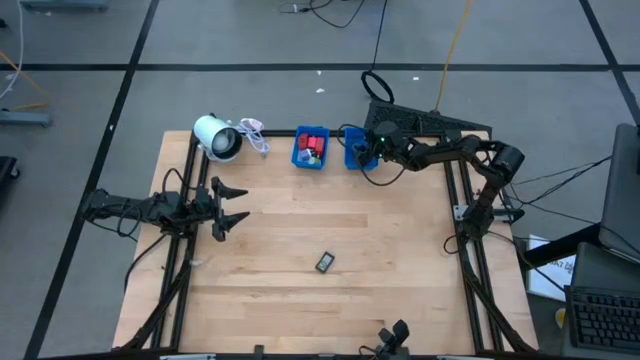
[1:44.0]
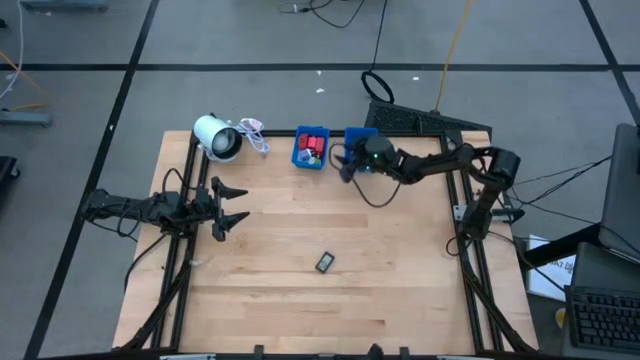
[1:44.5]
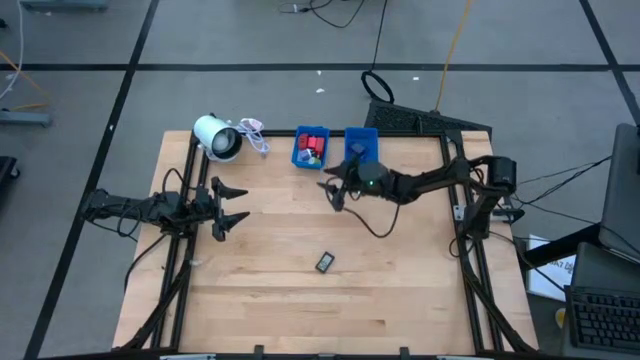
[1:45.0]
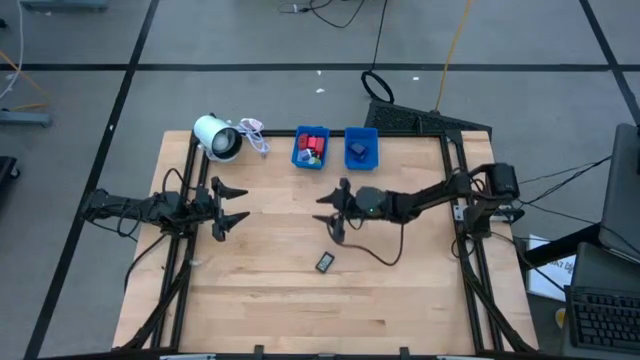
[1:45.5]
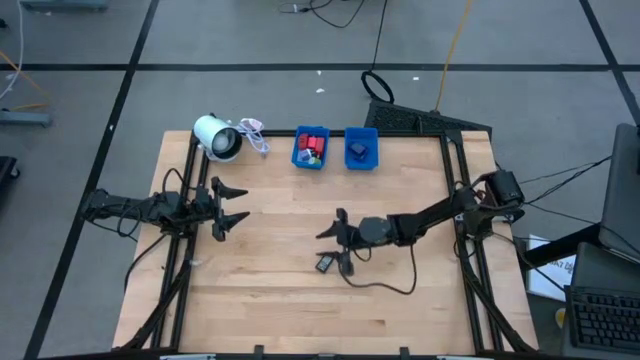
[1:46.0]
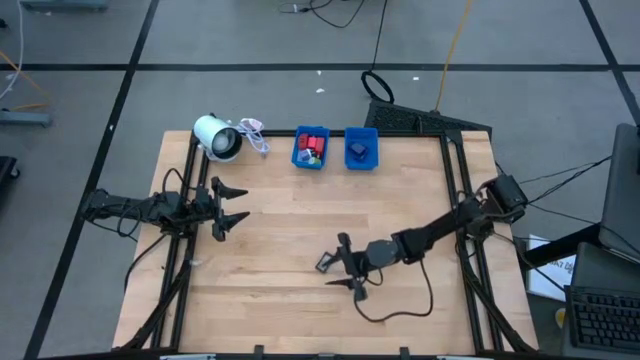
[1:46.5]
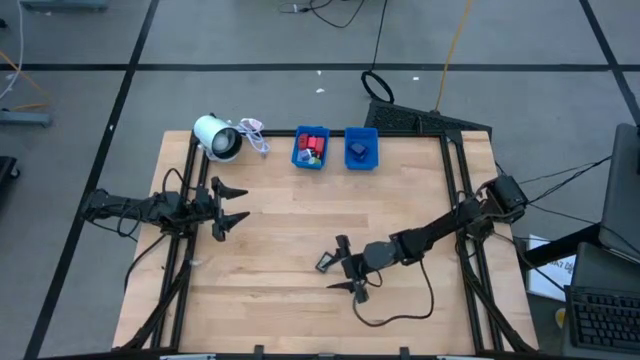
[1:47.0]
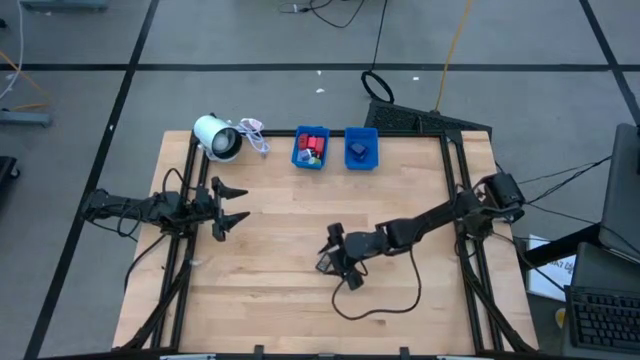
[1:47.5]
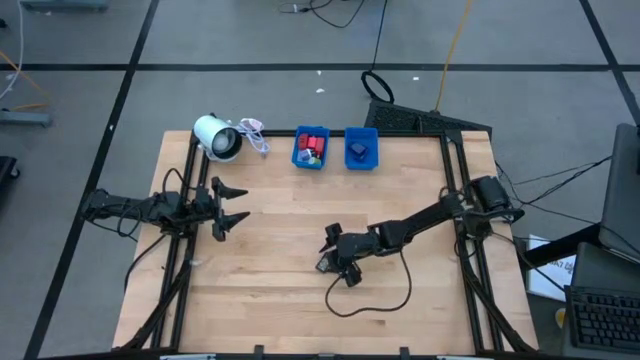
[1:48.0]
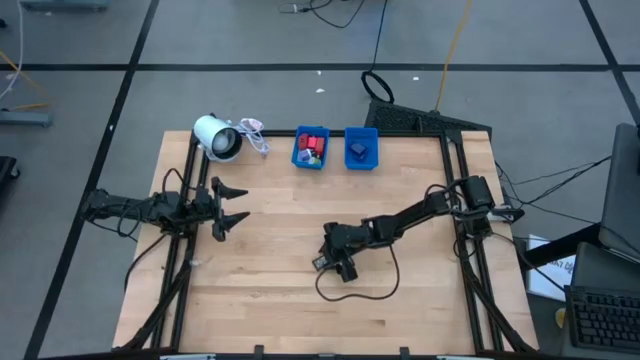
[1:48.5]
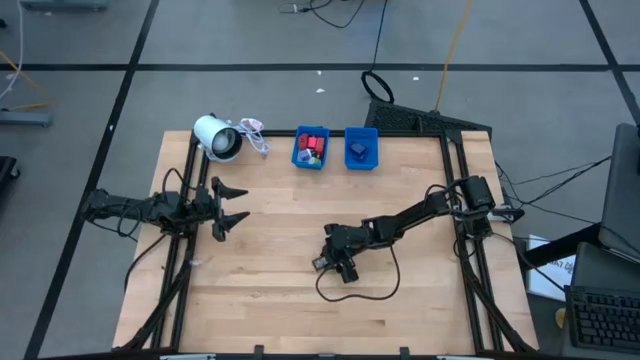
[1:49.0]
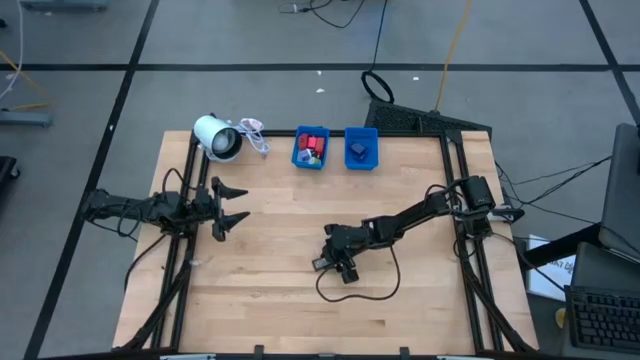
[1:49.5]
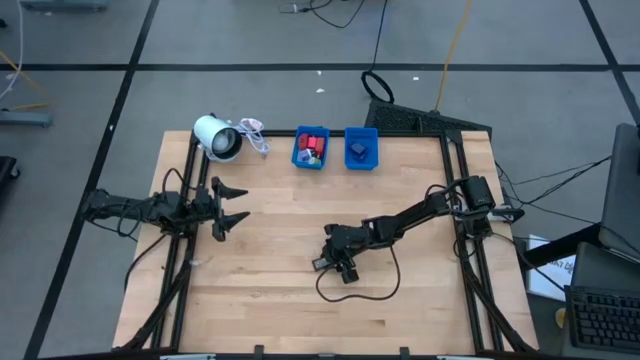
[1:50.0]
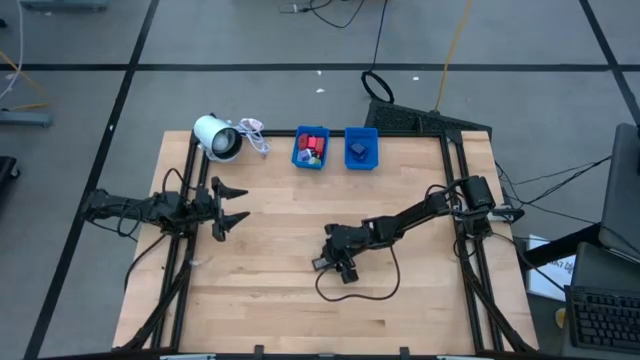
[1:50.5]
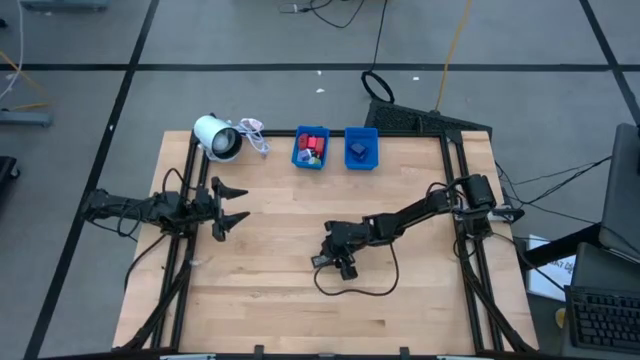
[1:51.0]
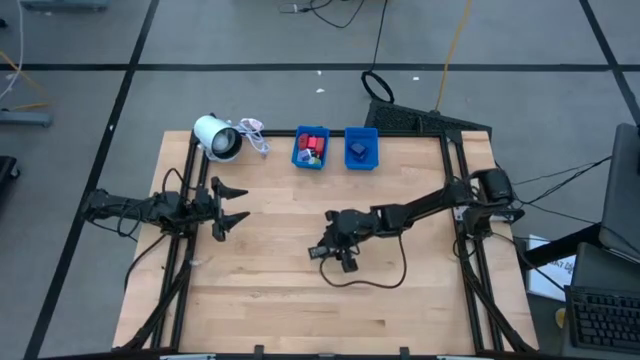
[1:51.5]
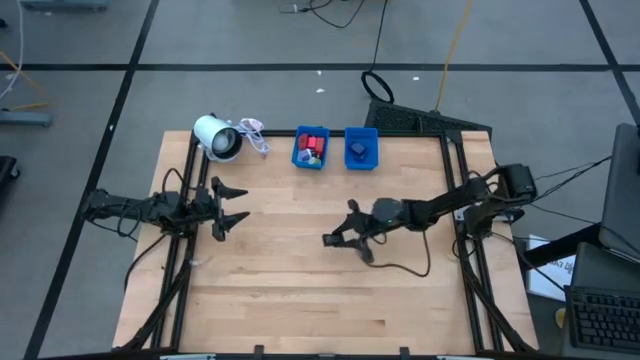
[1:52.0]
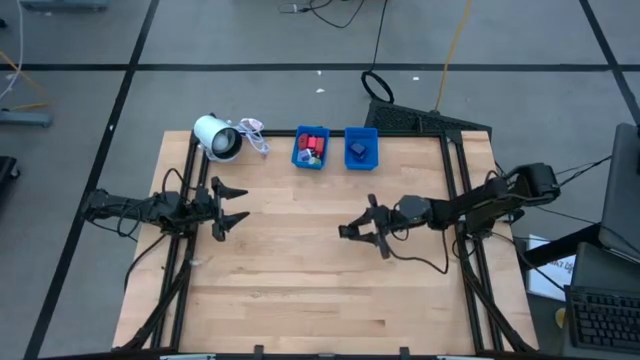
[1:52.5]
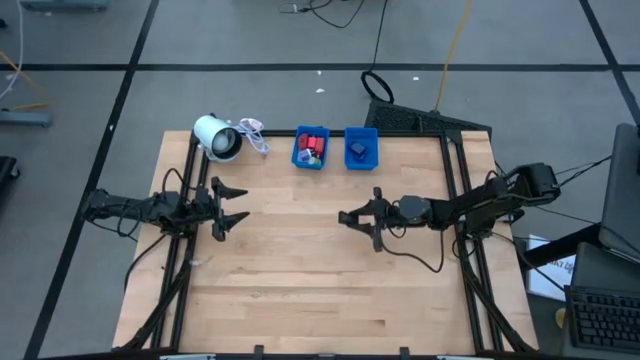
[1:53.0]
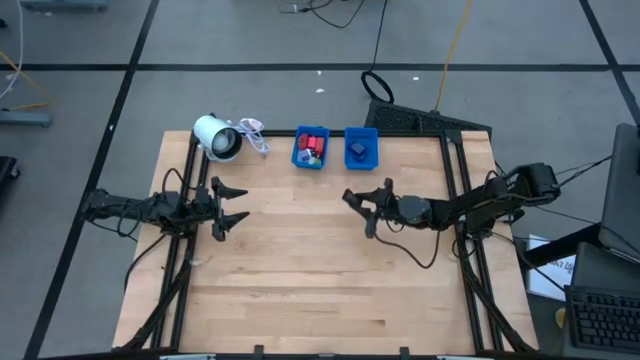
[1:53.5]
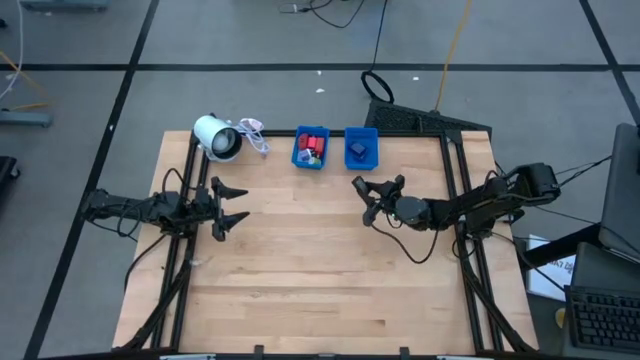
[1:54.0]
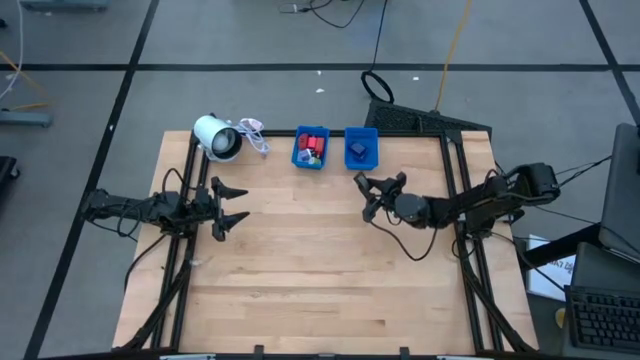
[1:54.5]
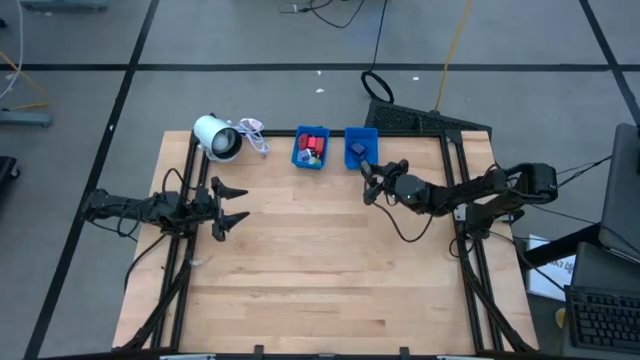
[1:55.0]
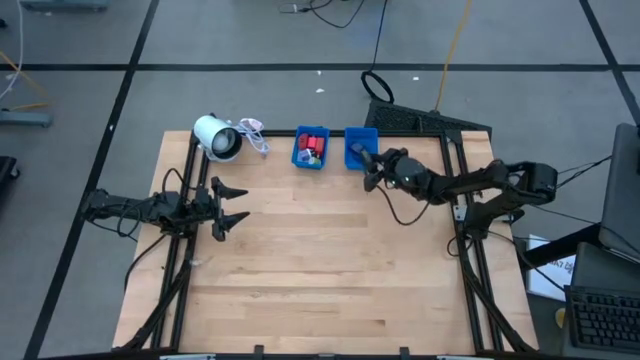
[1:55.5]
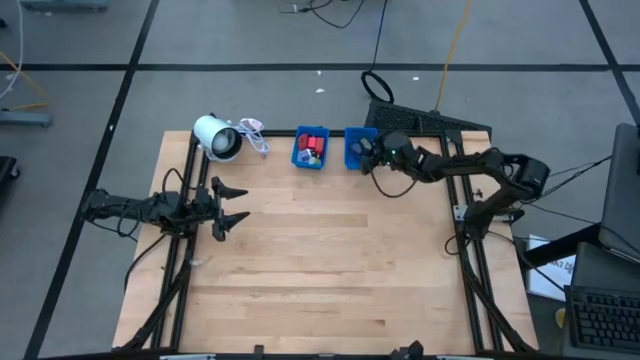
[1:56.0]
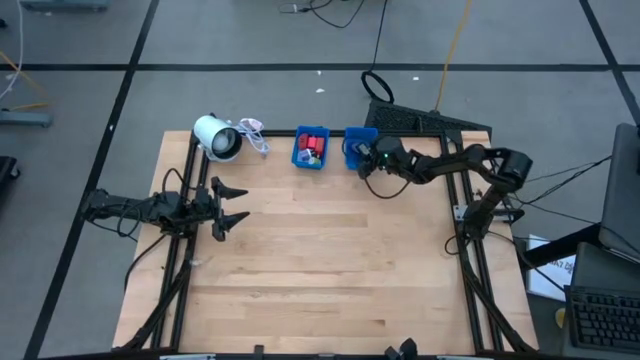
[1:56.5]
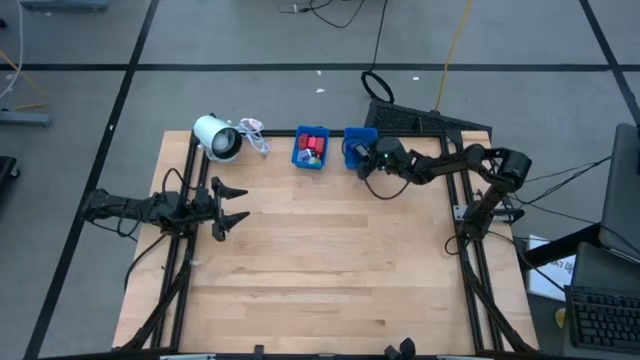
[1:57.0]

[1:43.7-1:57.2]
Task: Pick & Place Office items
Put the black digital clock into the right basket

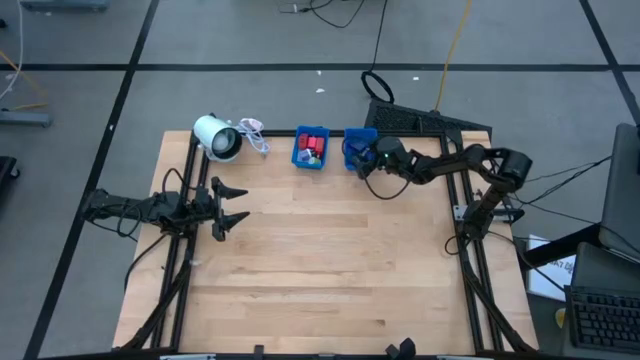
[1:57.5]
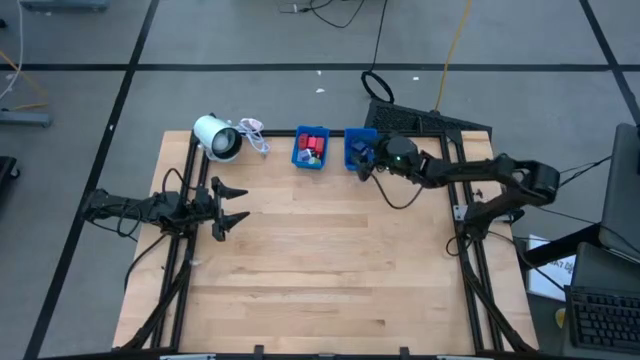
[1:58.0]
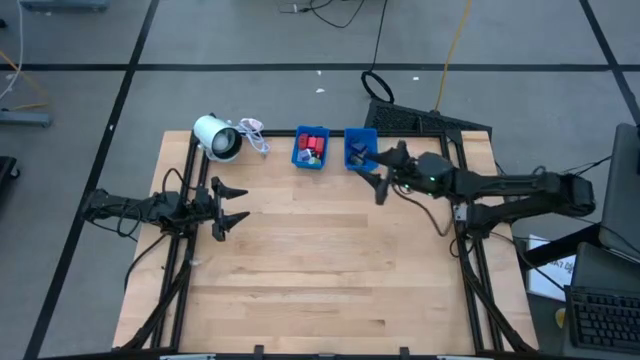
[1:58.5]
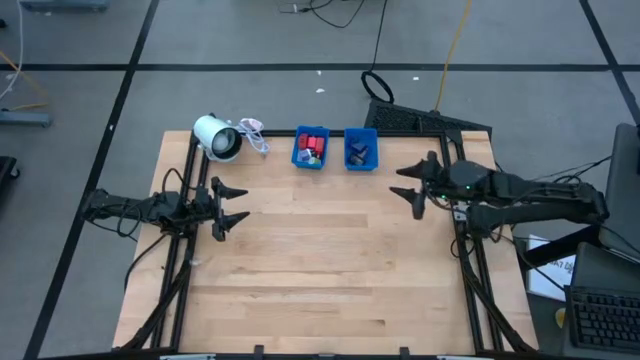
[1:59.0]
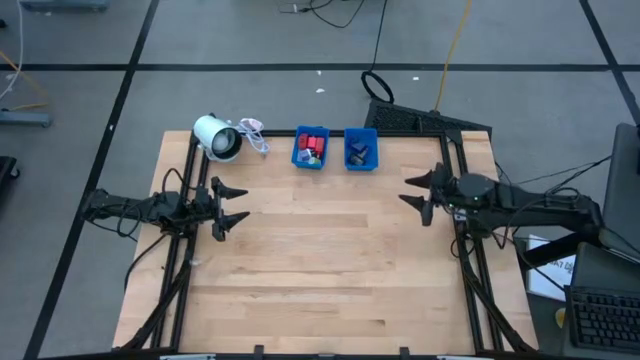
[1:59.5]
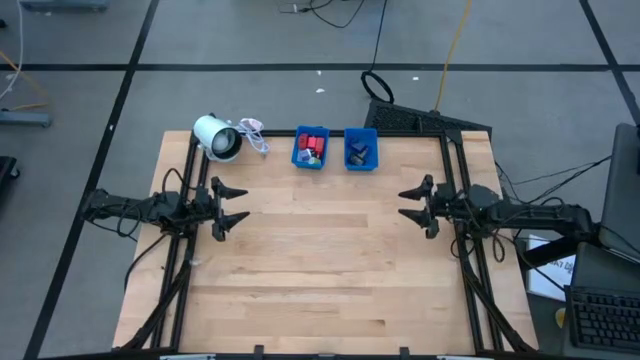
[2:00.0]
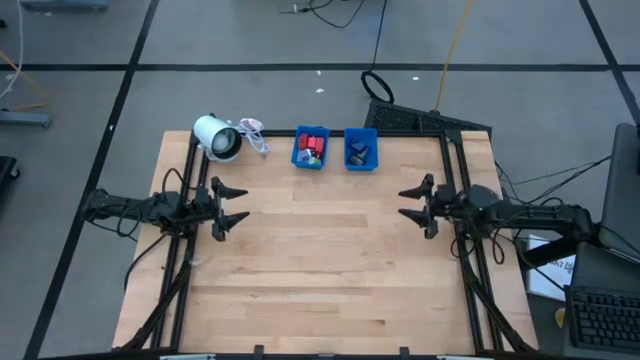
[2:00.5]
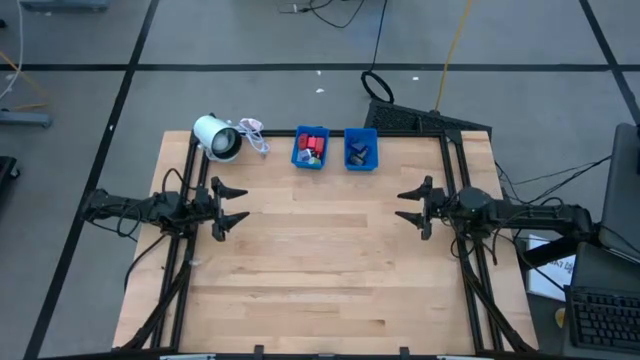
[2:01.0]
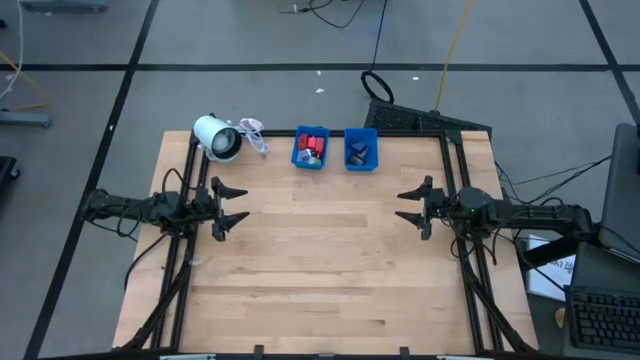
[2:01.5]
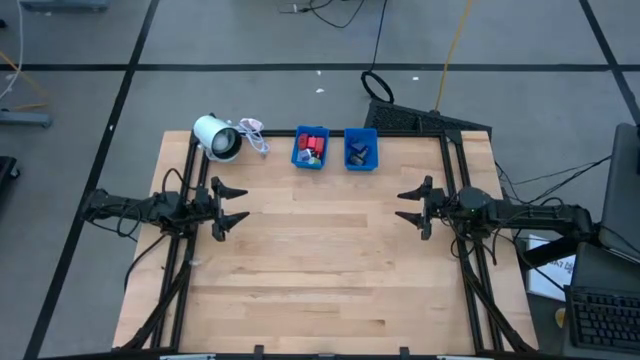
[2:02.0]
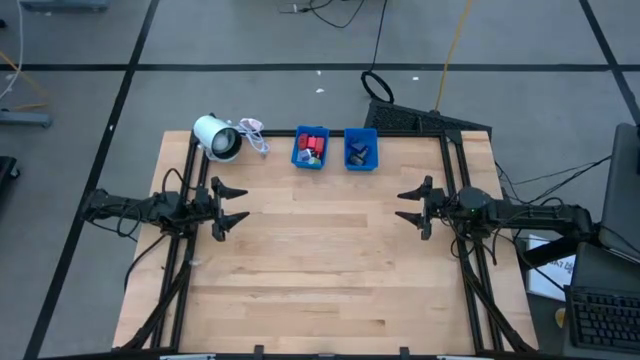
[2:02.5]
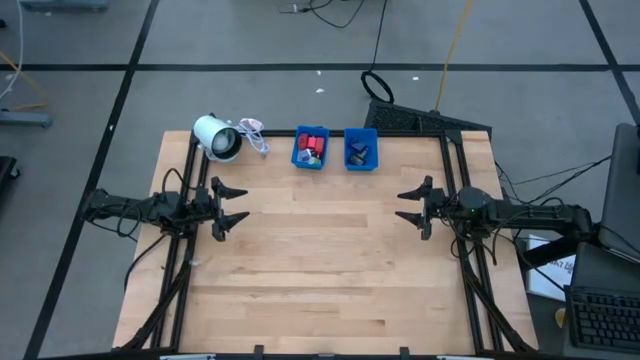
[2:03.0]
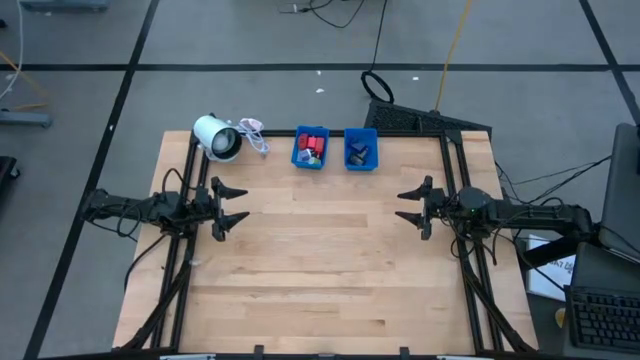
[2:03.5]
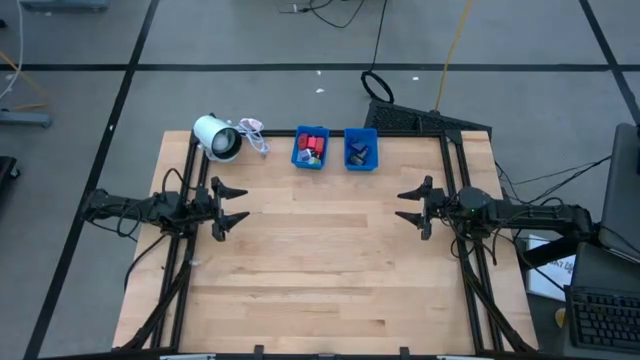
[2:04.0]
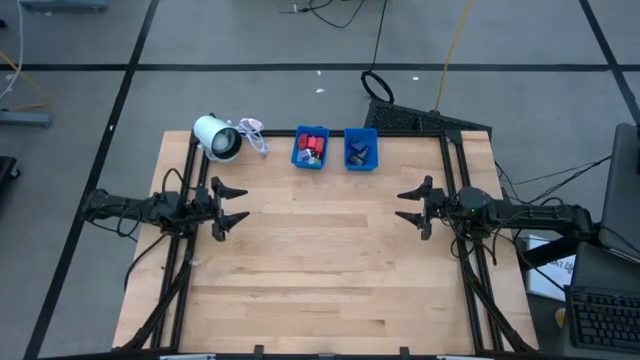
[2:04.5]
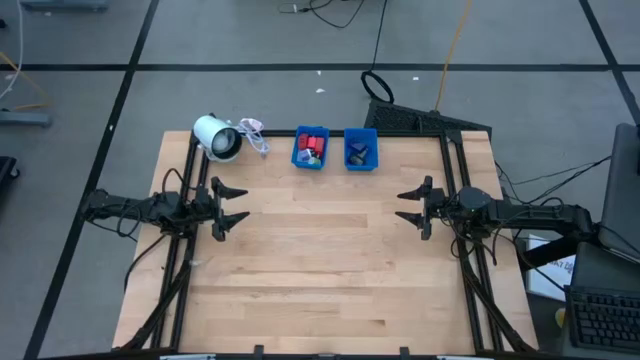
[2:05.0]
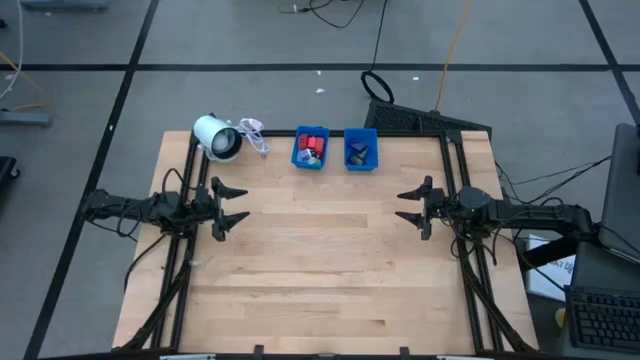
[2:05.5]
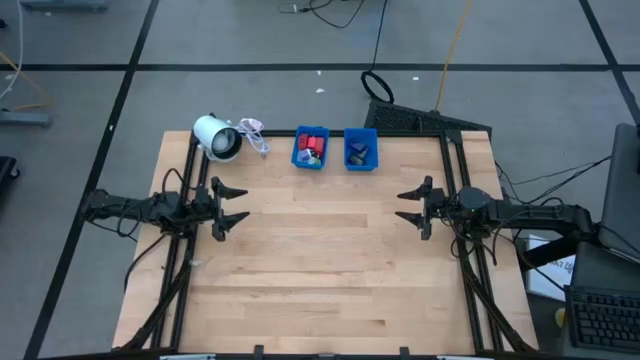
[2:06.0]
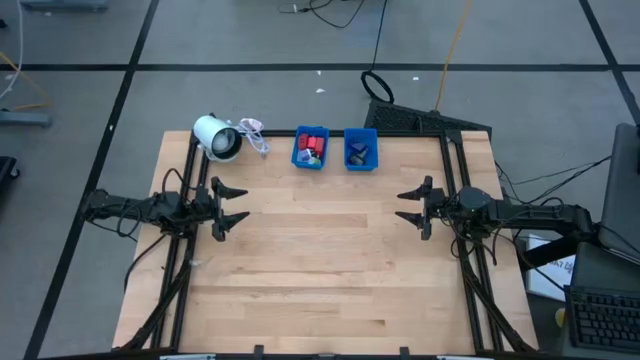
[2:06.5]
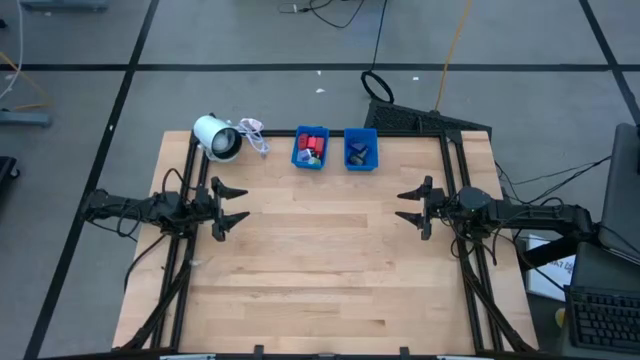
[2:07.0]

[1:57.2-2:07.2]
Return to Home Position
